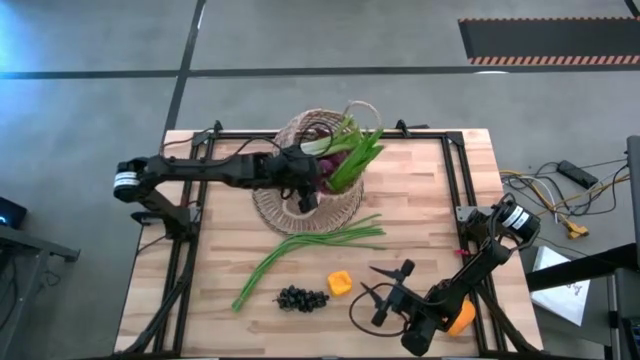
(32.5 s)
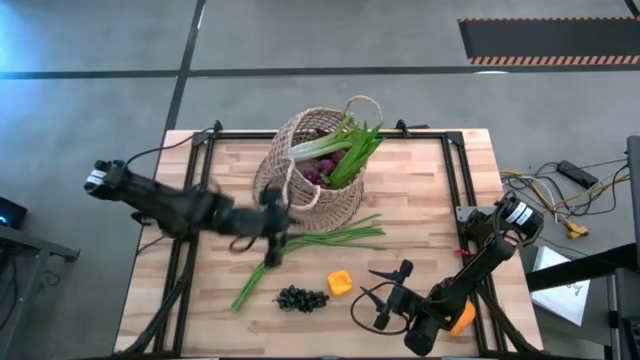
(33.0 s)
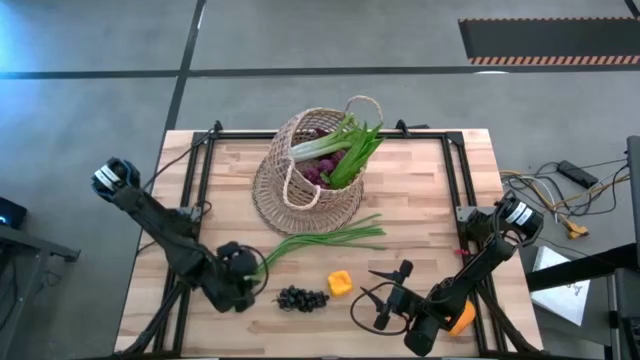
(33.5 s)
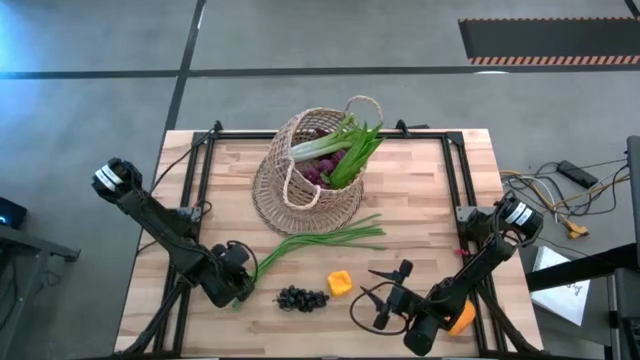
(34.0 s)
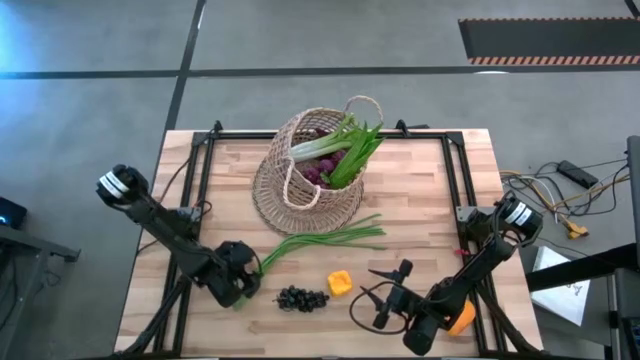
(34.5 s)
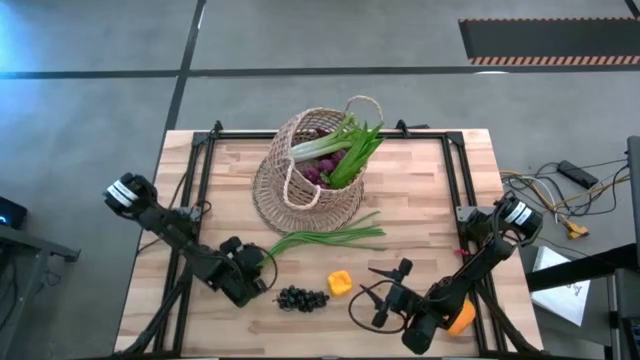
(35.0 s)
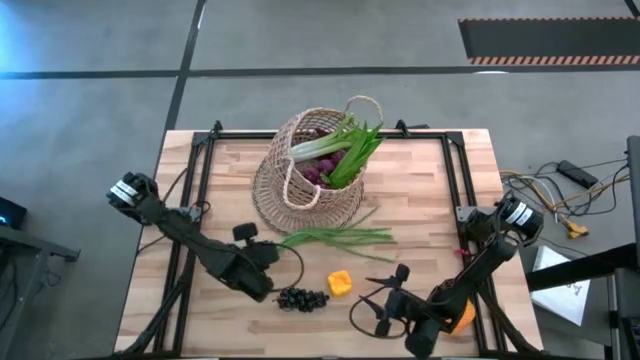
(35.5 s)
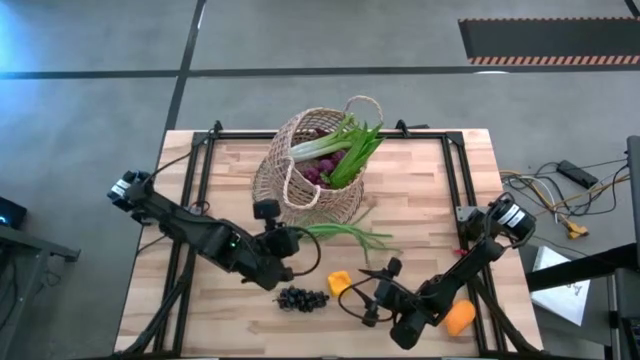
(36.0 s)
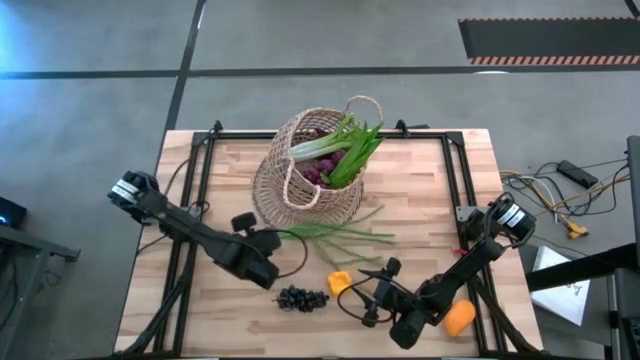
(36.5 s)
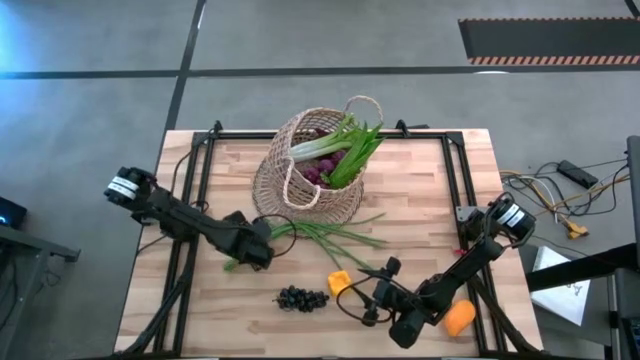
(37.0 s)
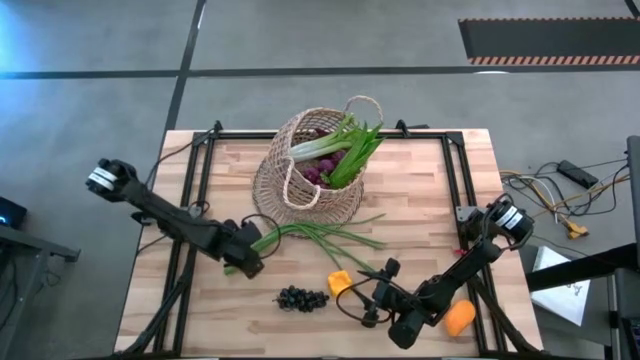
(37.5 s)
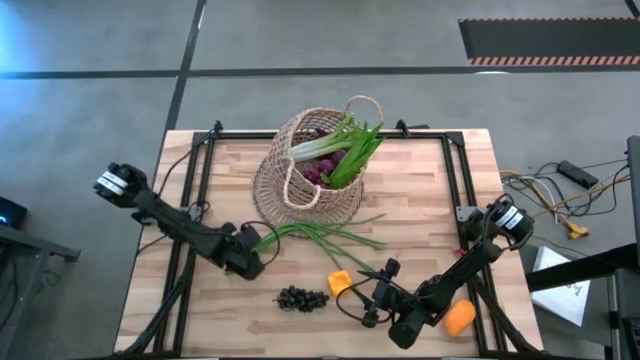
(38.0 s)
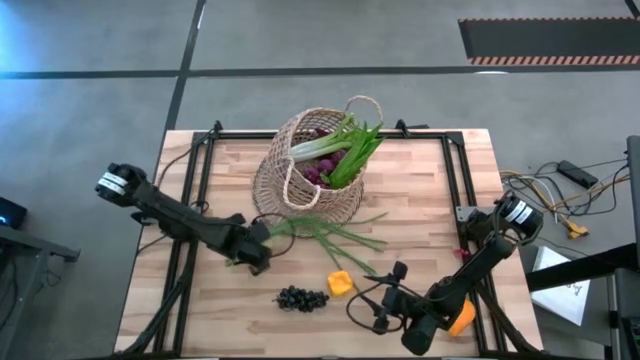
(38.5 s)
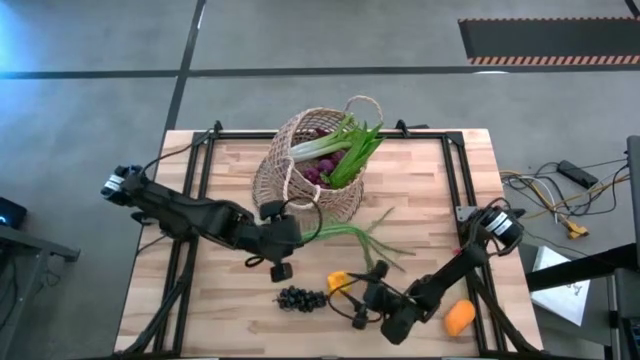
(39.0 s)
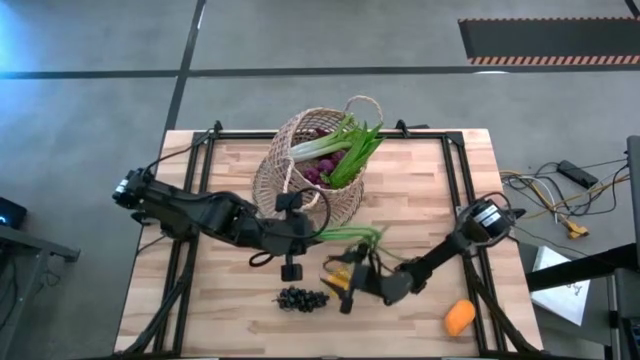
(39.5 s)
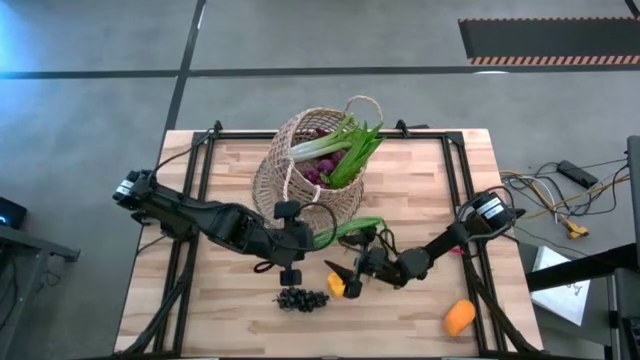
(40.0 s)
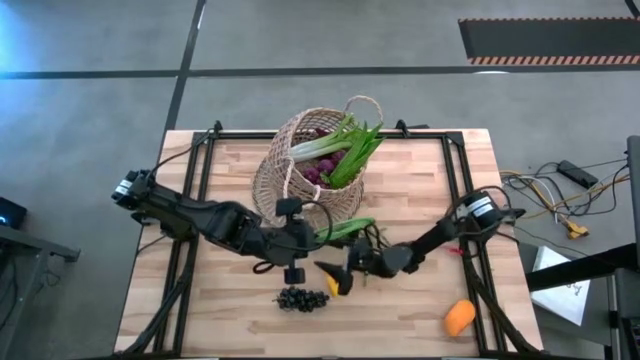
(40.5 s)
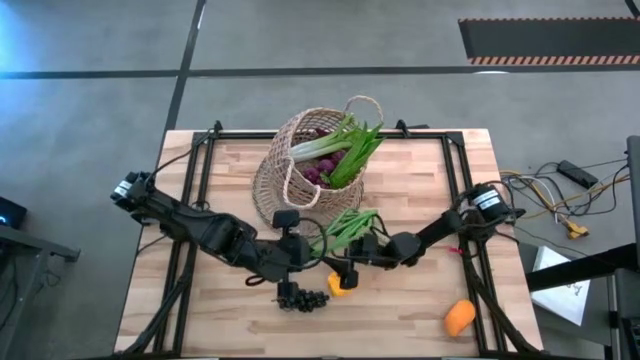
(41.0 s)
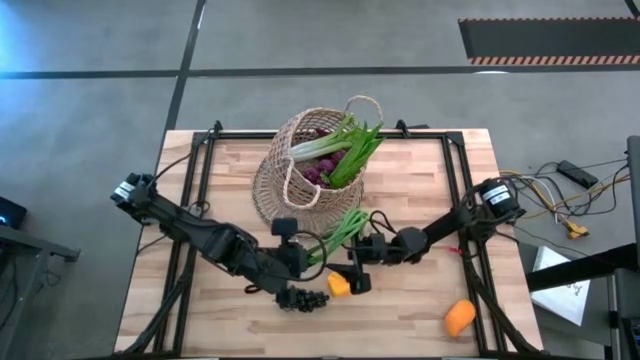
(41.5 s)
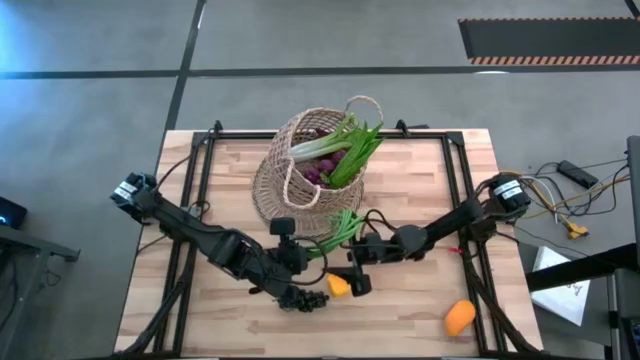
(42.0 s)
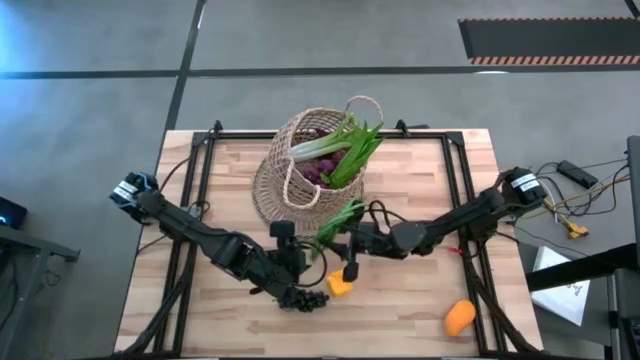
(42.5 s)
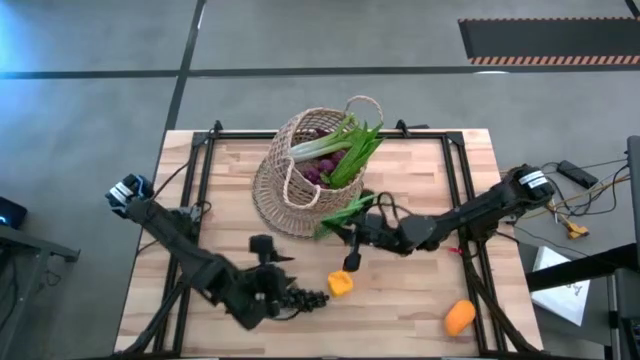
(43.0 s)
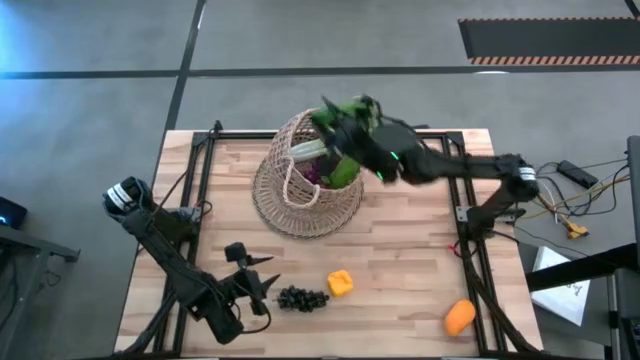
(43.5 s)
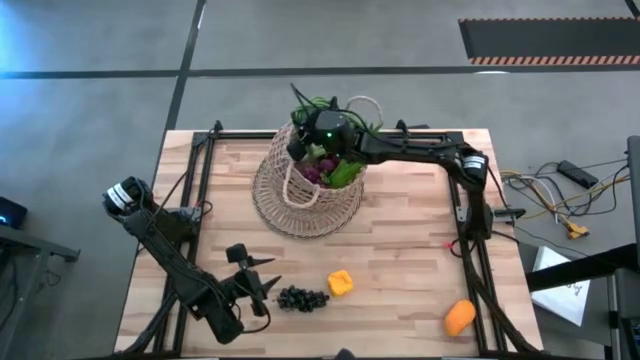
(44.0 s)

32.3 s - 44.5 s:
Task: Build produce basket
Put the green string beans into the brown basket

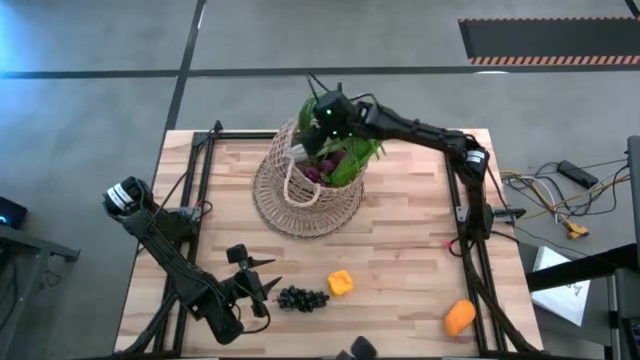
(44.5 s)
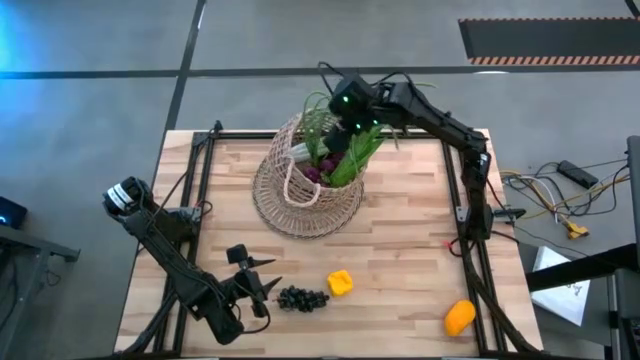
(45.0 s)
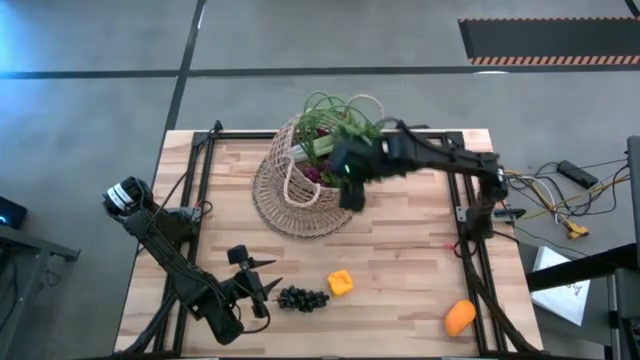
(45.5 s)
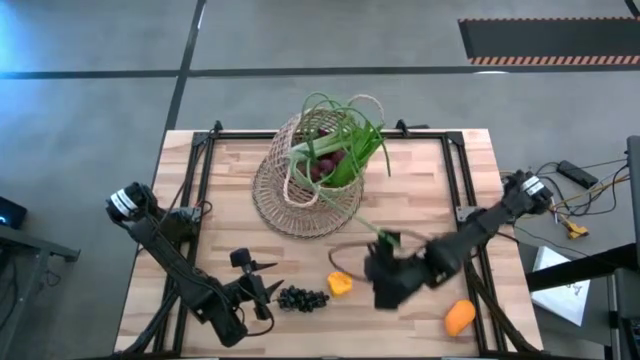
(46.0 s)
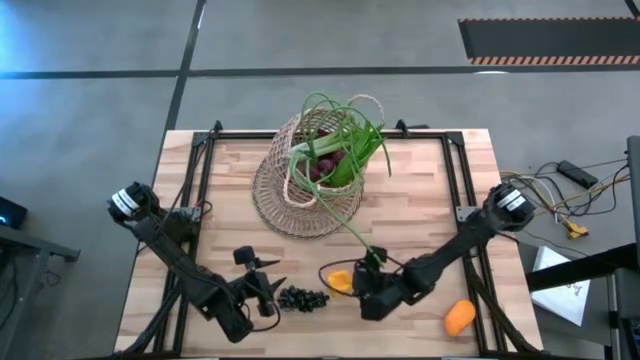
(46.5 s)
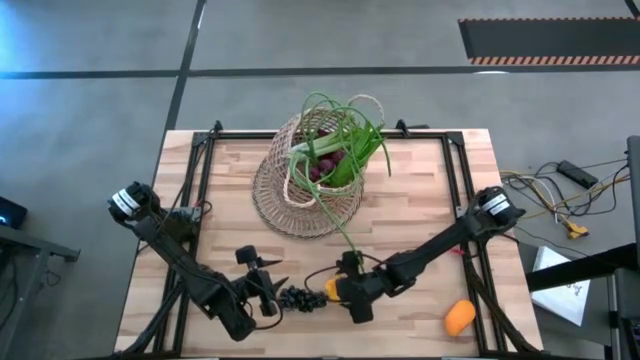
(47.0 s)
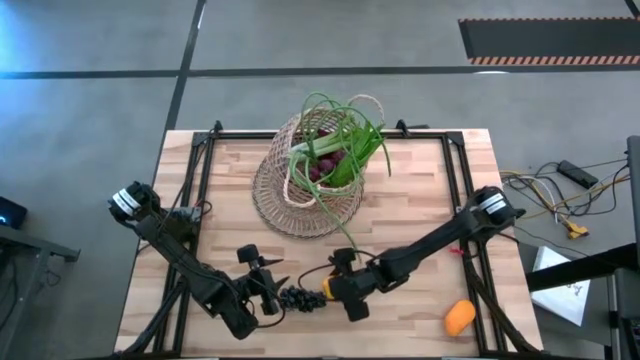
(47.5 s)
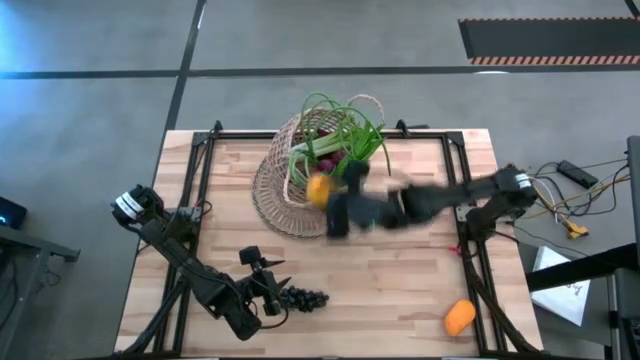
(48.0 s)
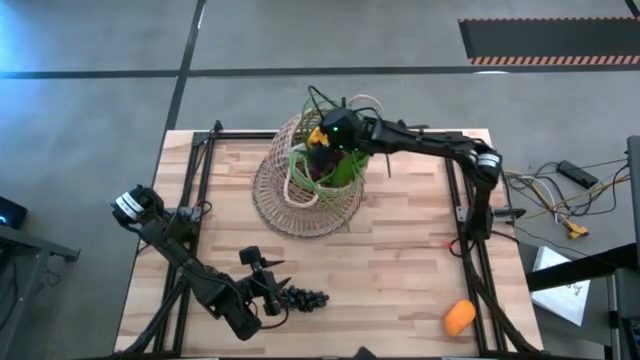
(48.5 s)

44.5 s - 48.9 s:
Put the yellow bell pepper into the basket

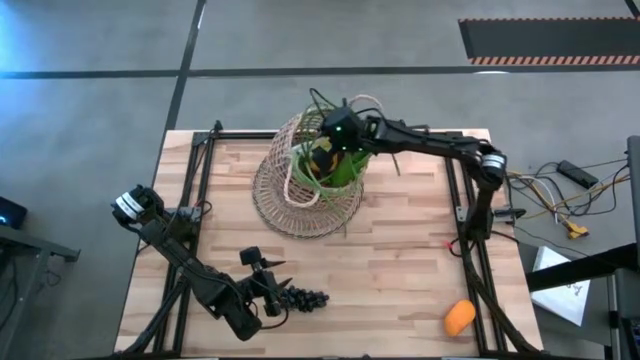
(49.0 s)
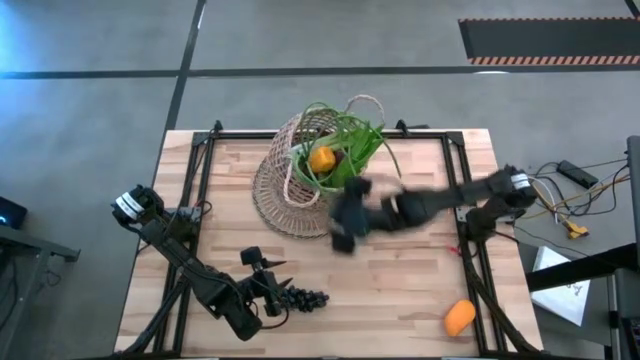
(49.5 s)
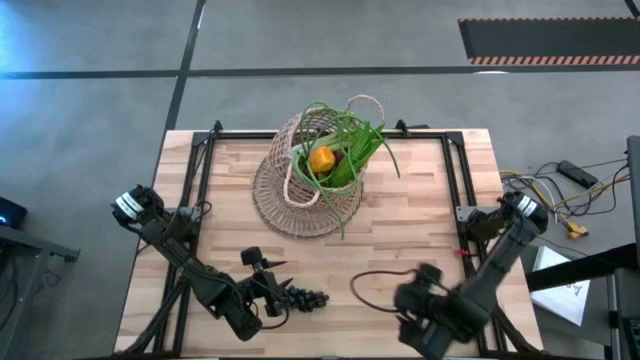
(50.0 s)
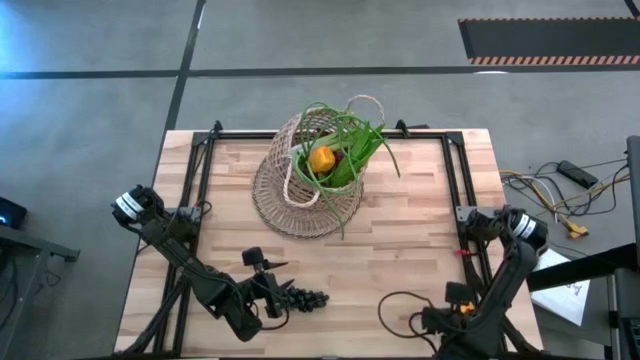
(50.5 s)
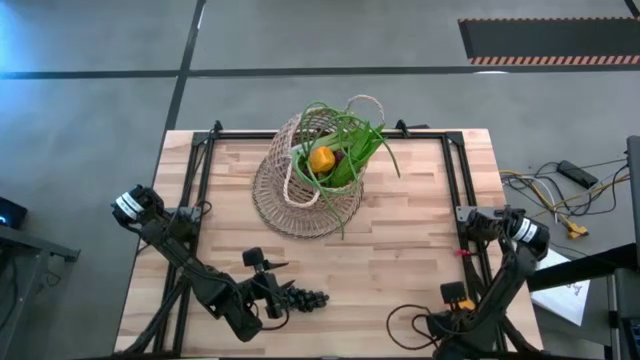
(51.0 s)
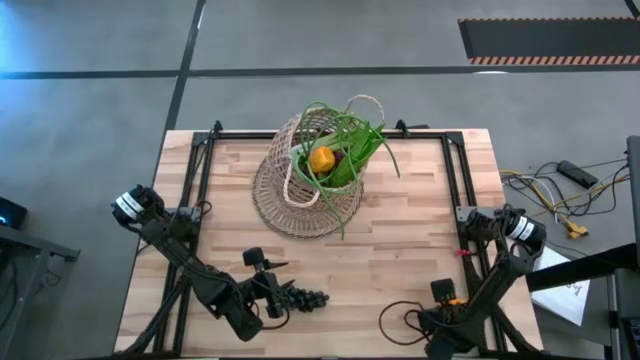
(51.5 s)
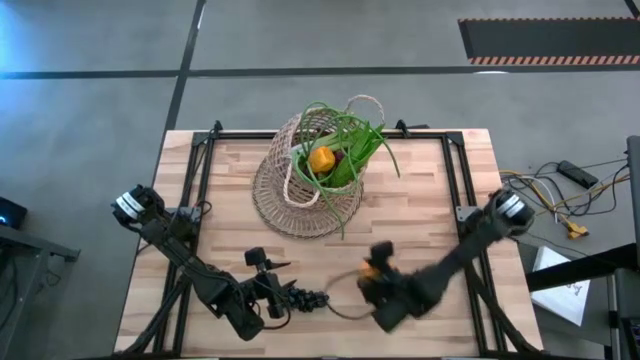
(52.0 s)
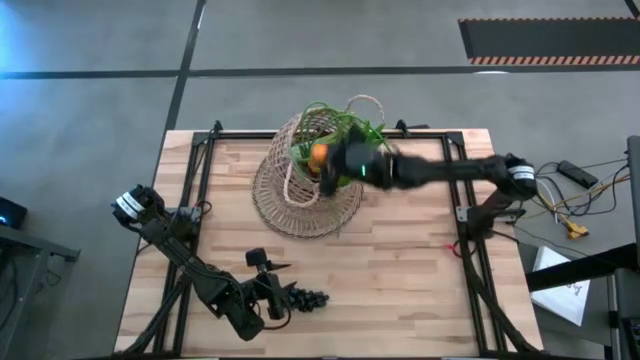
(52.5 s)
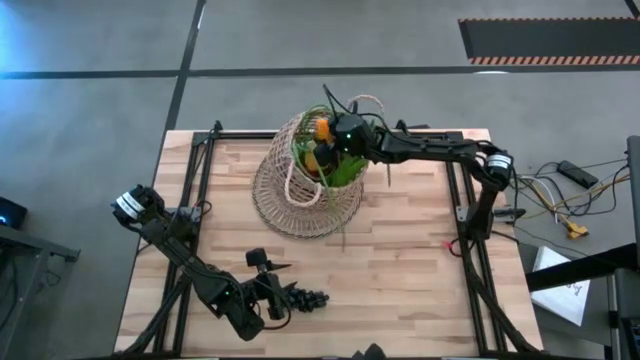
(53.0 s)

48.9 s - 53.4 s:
Put the yellow mango into the brown basket
